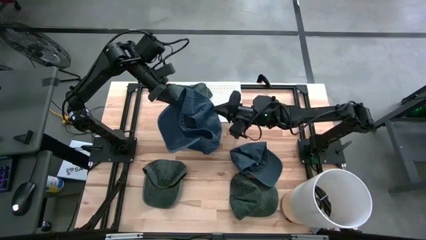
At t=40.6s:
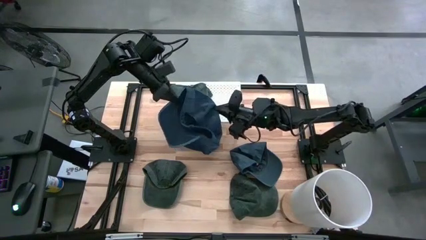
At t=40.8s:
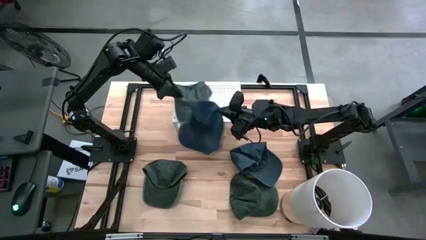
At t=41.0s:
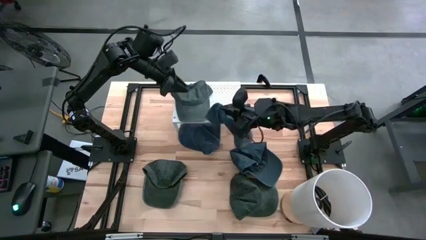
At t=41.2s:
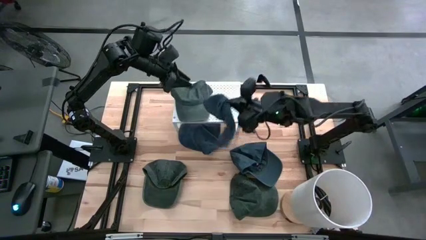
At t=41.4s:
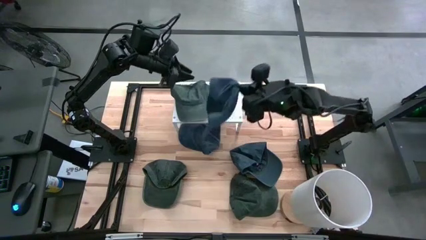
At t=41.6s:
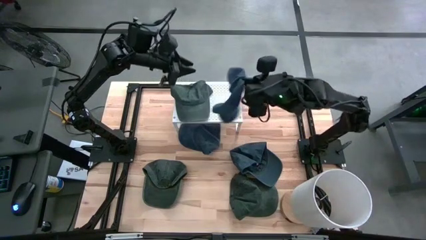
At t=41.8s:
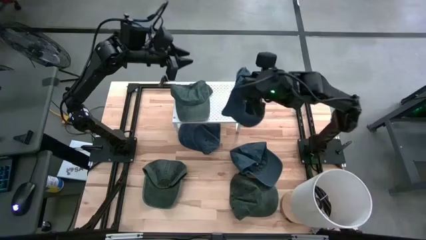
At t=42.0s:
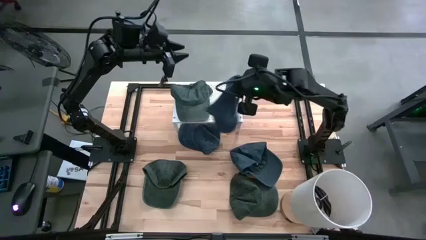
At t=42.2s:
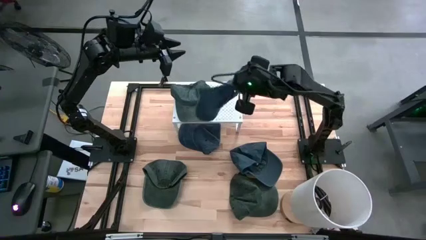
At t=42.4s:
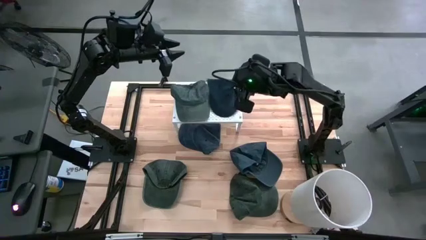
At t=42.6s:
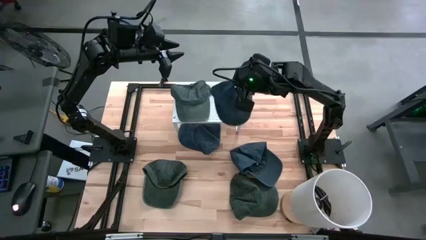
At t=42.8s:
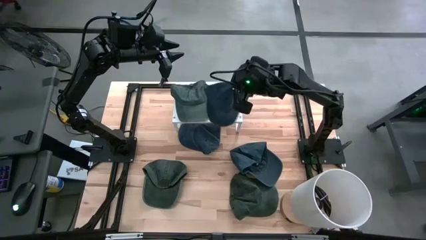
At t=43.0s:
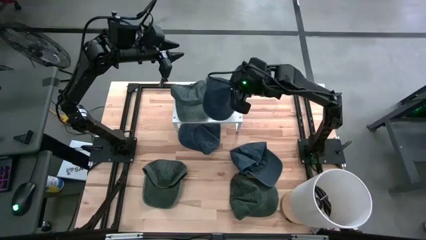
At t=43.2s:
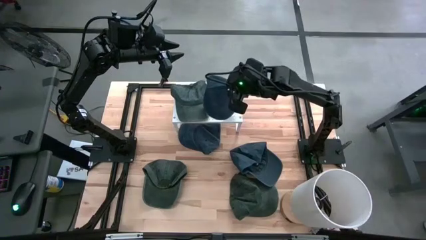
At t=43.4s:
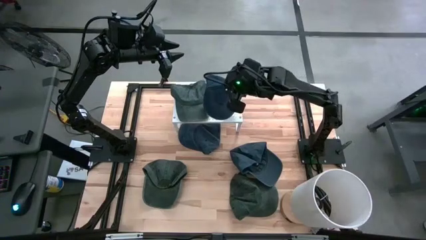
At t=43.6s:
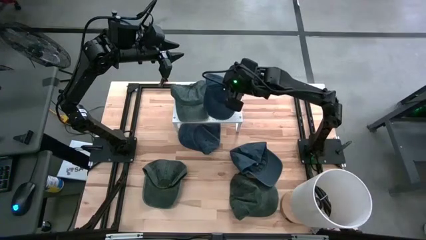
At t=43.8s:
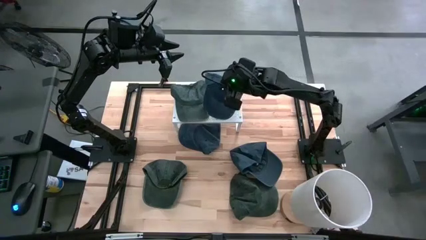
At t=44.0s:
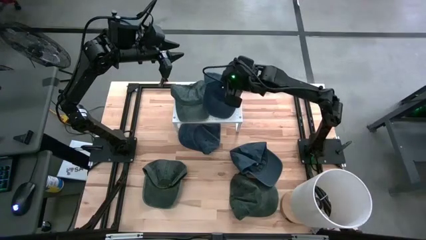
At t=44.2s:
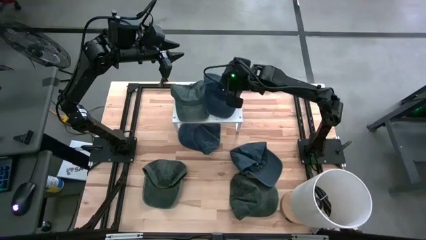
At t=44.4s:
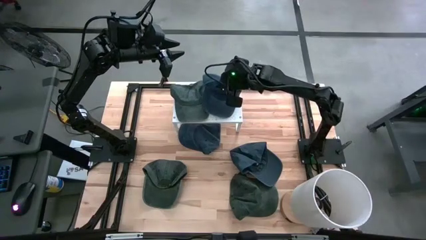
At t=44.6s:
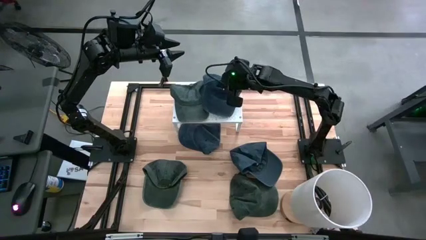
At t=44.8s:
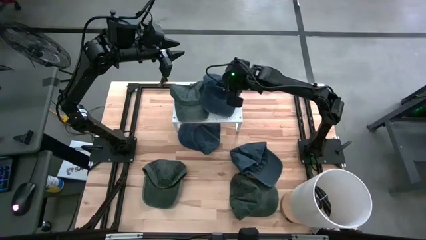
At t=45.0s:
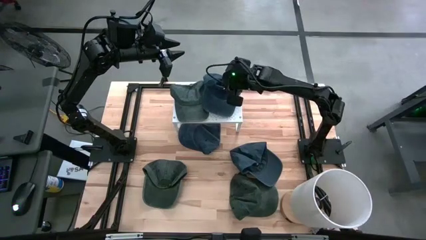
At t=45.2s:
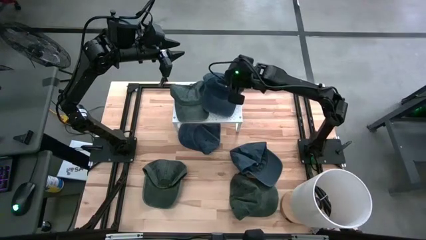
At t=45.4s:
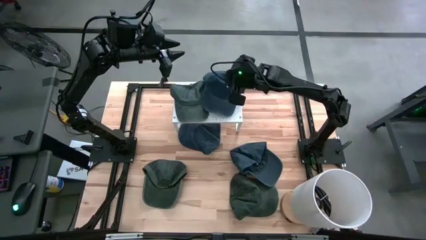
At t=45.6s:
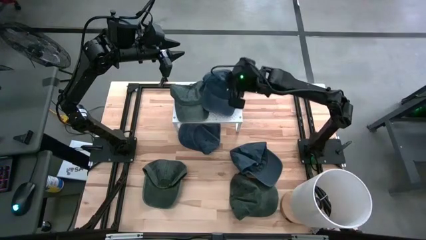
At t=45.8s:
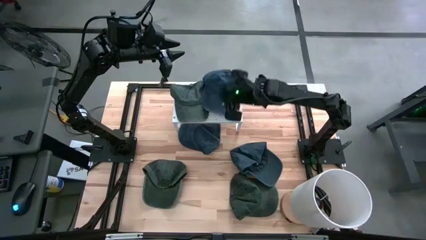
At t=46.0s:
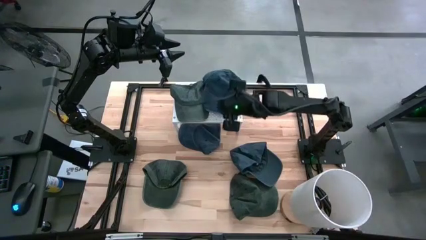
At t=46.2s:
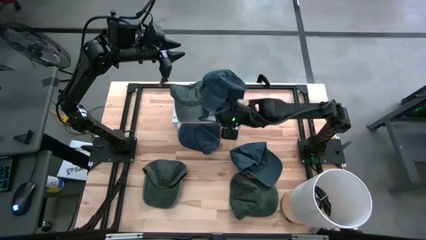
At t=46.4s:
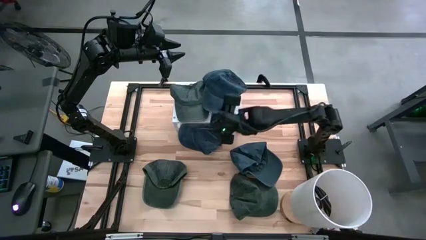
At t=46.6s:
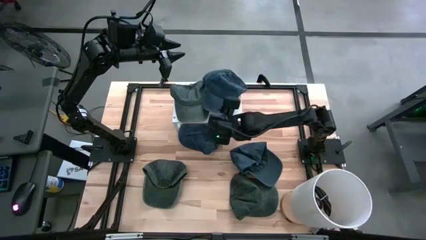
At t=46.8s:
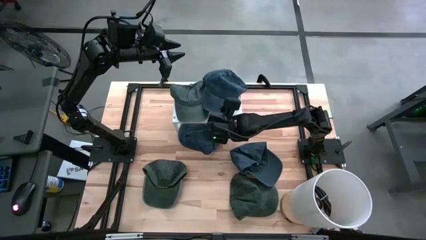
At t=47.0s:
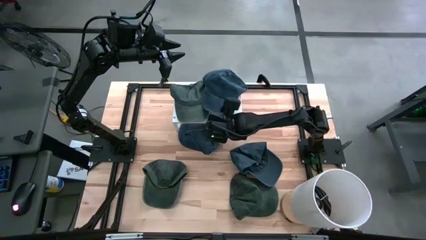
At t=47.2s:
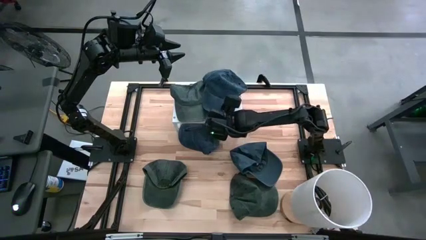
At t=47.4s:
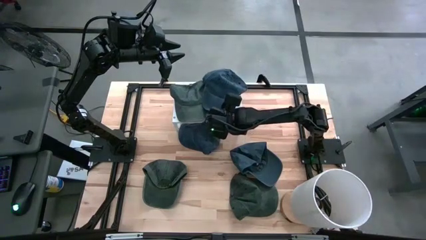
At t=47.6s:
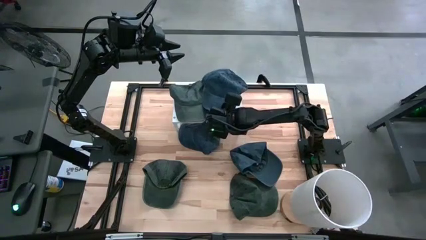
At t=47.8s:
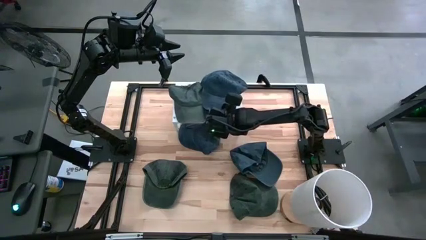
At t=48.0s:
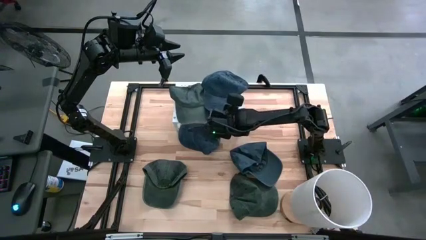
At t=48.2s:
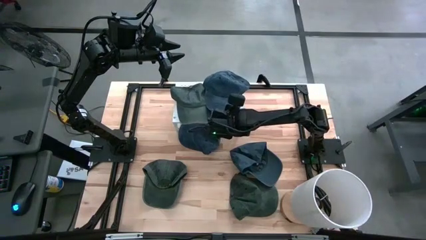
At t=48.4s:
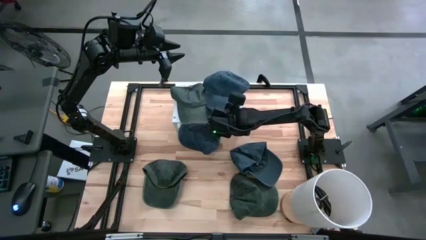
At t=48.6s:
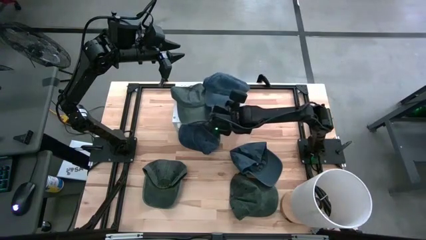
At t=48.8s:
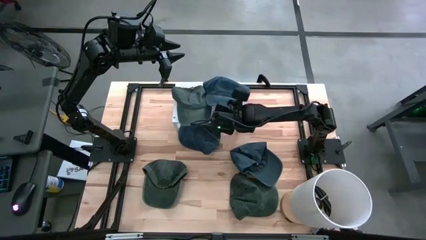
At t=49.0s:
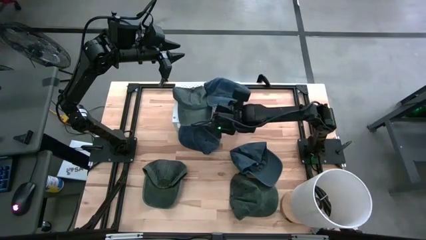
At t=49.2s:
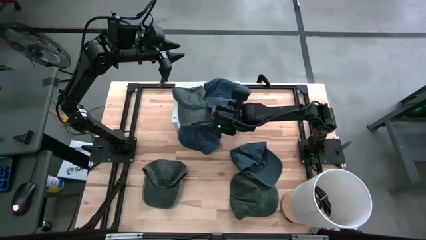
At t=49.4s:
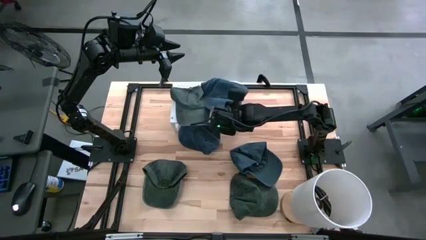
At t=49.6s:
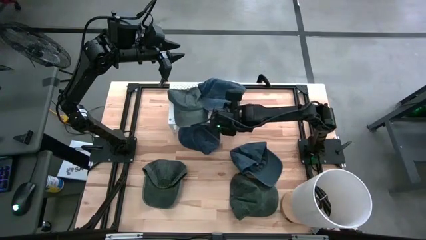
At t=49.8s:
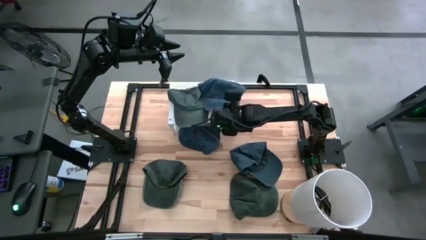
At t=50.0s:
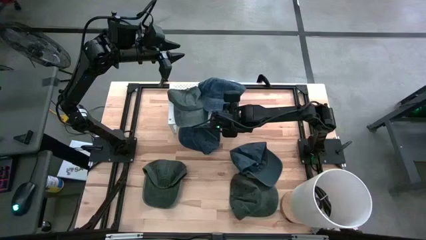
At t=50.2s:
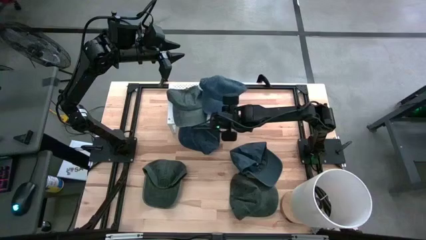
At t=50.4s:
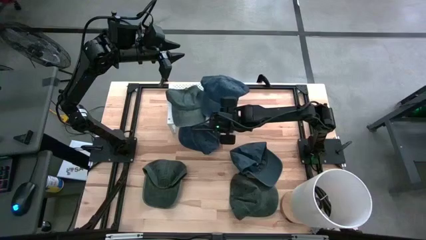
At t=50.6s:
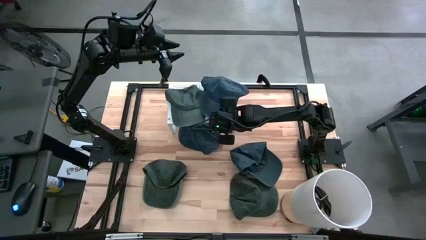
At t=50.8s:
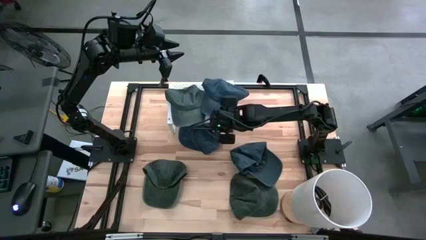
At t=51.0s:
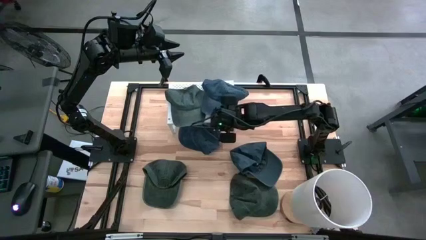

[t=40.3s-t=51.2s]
Task: Pick & Place hat
Put the left blue cap on the shelf

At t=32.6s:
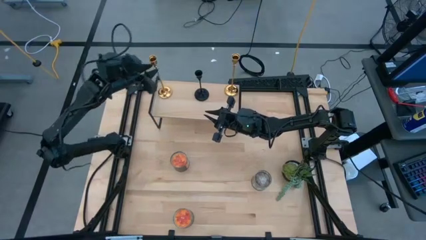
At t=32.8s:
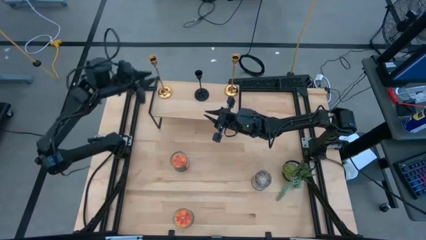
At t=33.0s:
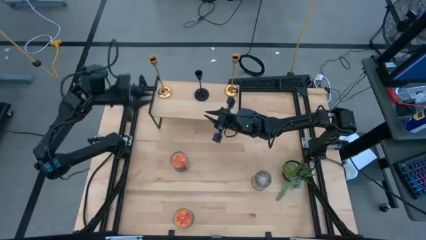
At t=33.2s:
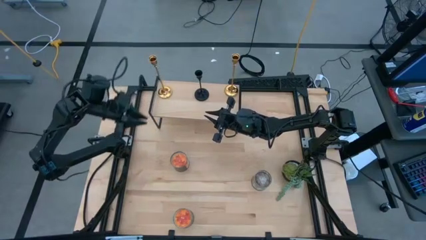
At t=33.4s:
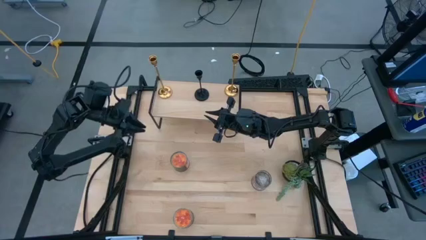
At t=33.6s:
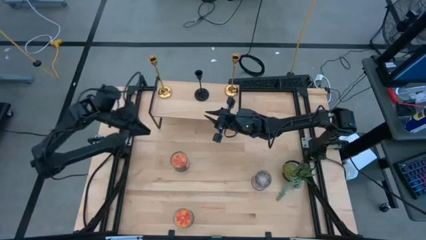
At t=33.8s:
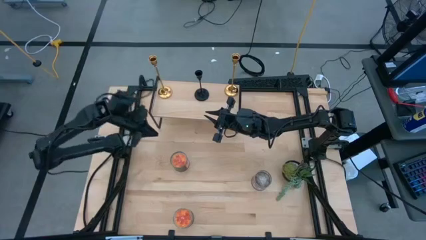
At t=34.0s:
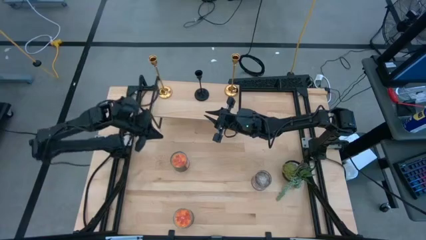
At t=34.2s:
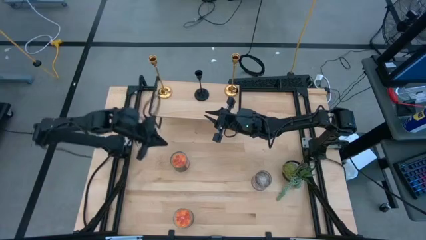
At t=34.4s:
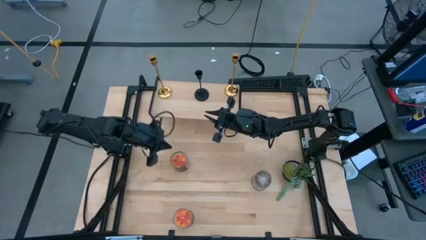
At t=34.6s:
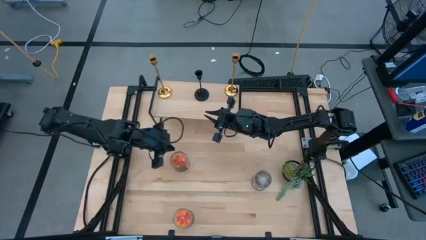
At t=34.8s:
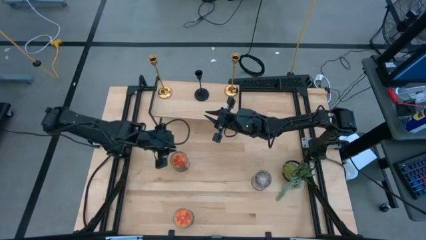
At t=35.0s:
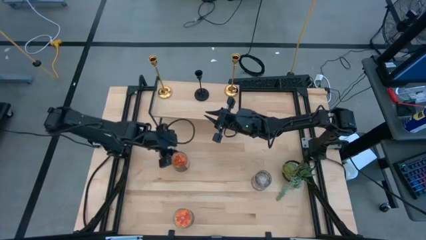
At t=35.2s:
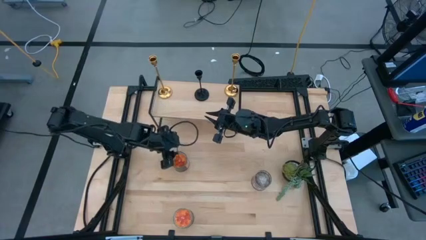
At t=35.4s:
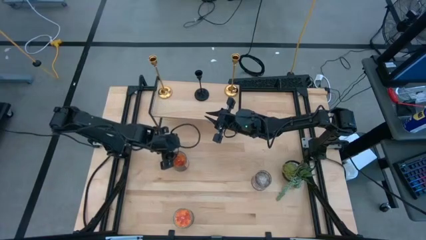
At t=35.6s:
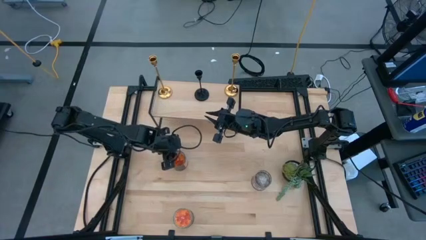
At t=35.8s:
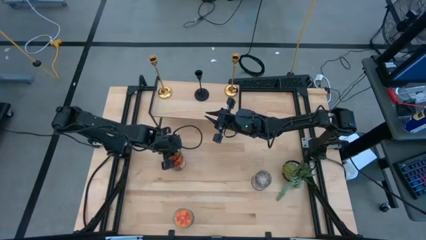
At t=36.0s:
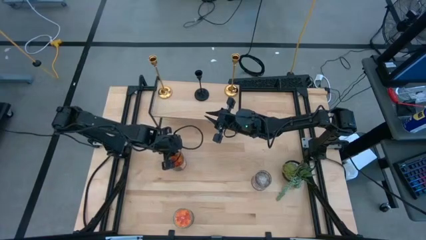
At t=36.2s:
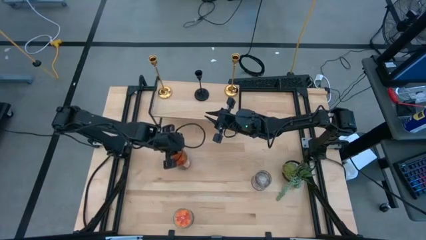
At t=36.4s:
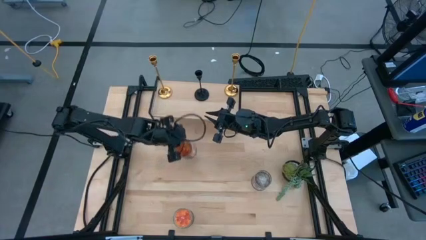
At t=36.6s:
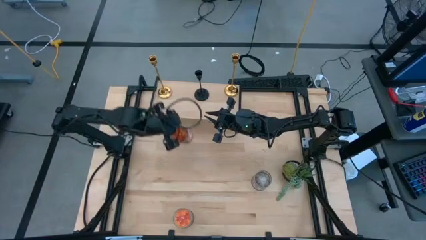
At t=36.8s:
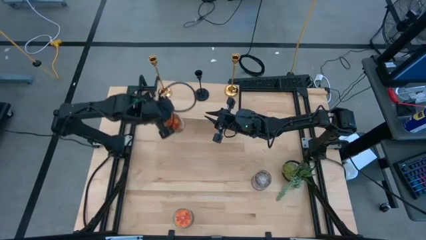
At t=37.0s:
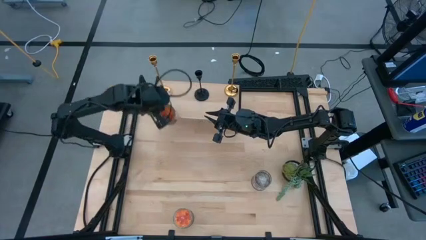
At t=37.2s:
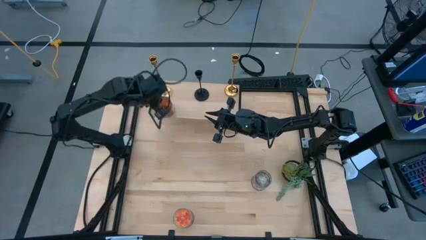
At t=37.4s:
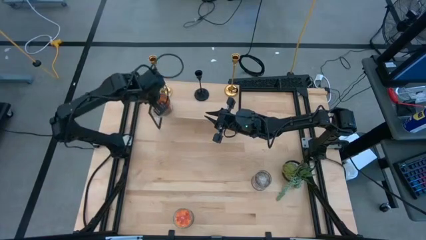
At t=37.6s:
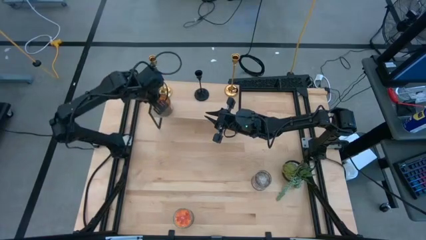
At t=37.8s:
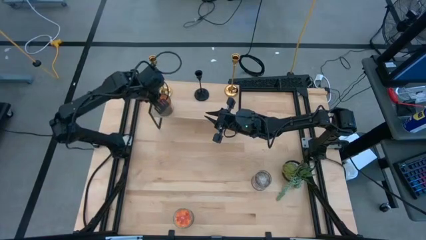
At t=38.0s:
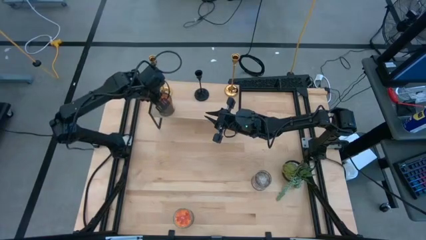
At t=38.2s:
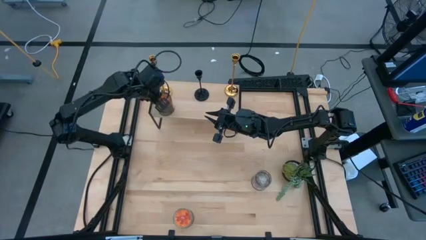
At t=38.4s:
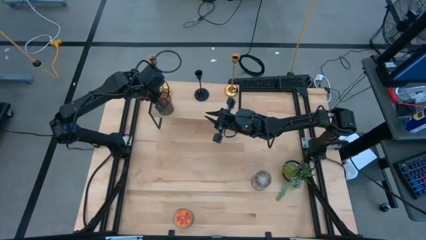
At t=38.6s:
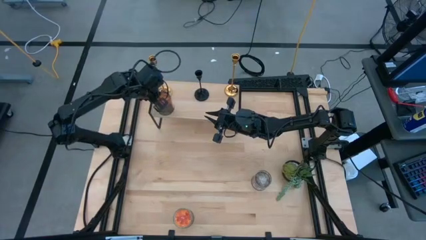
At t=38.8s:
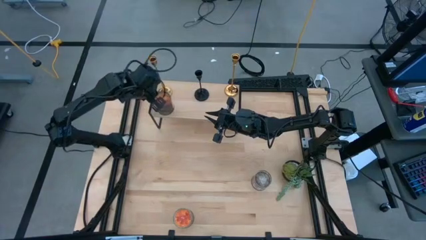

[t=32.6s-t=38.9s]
Task: Pick & Place candle stick holders
Put the top orange scented candle on the shelf aligned with the left golden candle holder
